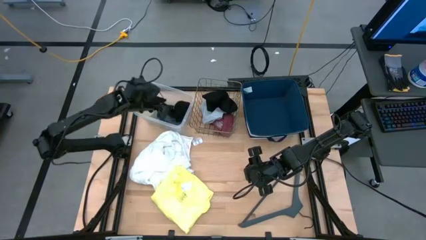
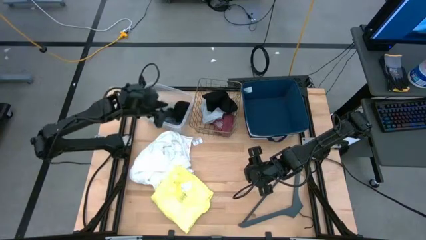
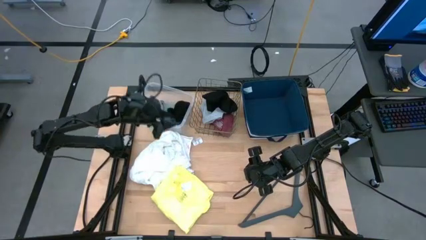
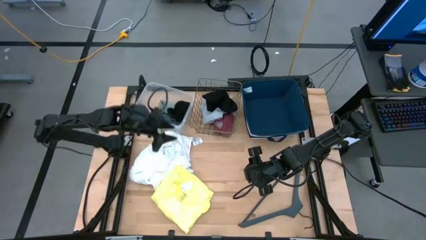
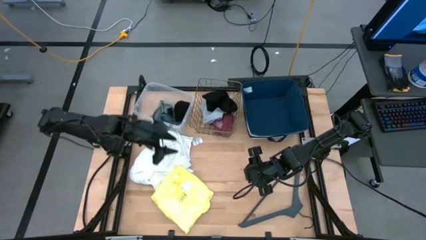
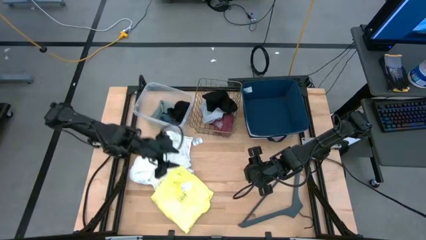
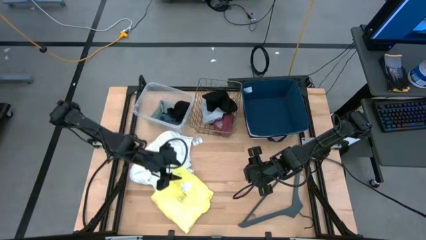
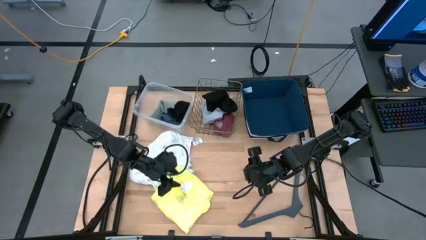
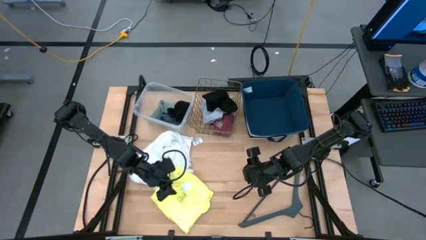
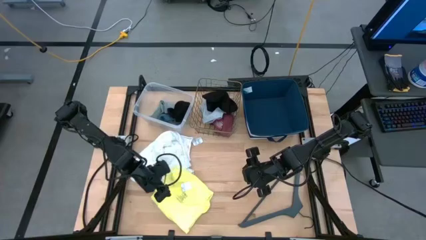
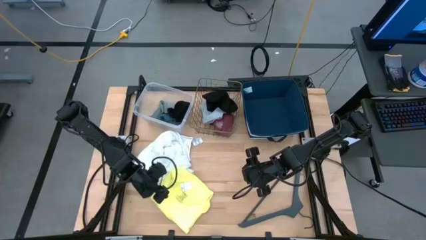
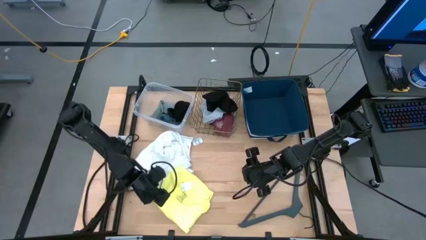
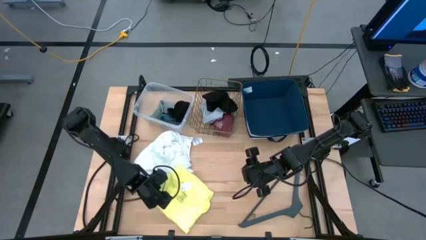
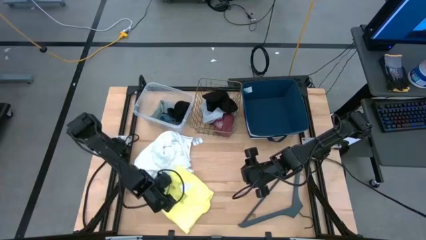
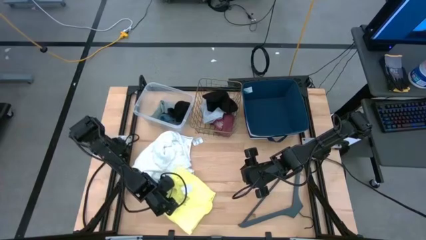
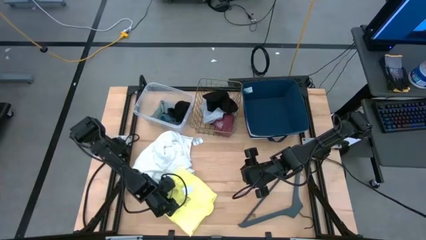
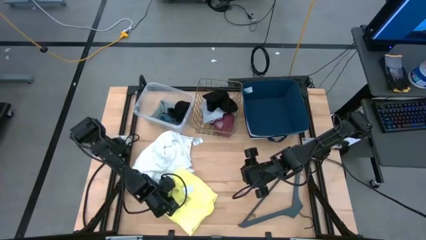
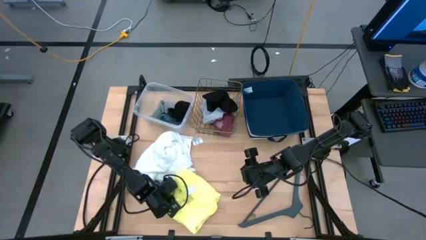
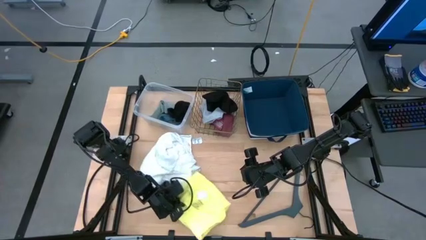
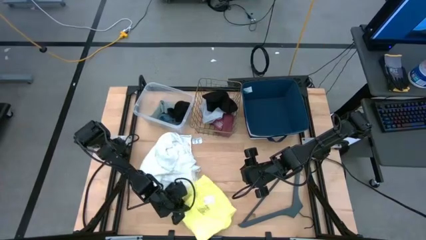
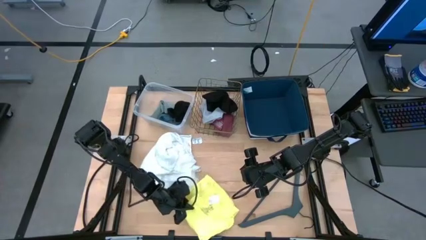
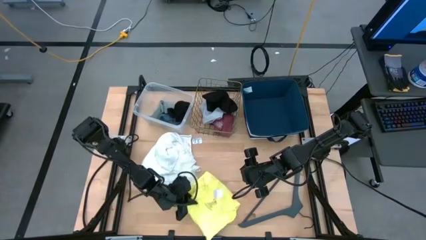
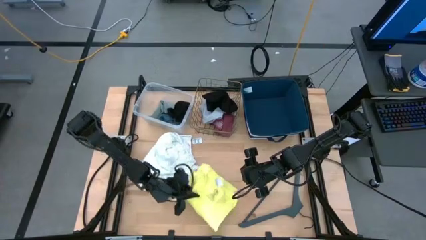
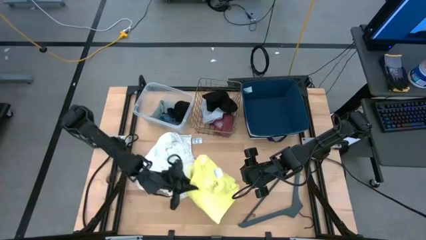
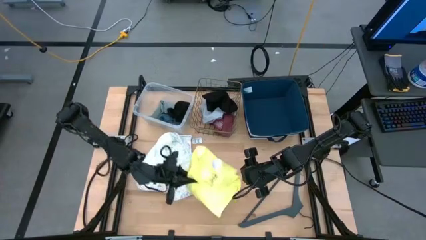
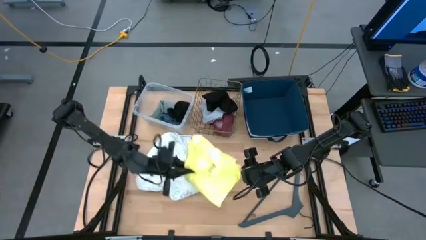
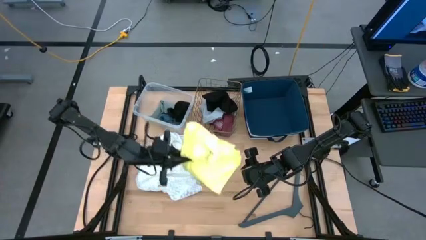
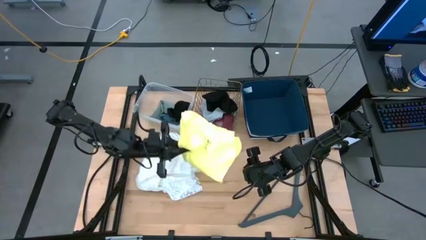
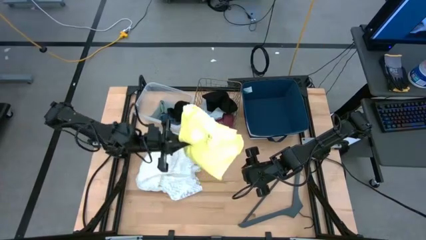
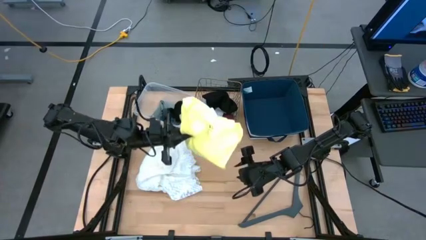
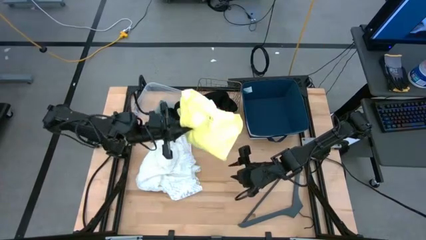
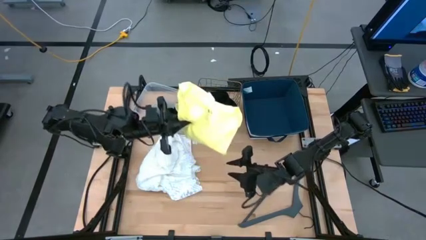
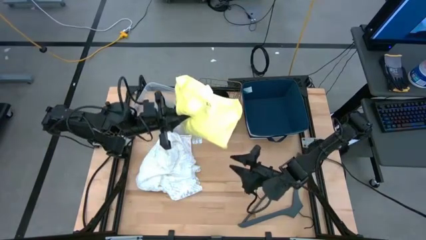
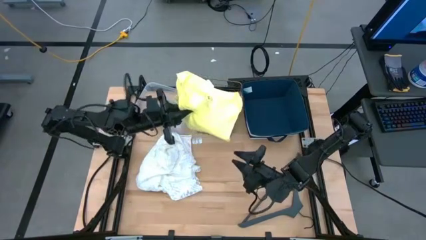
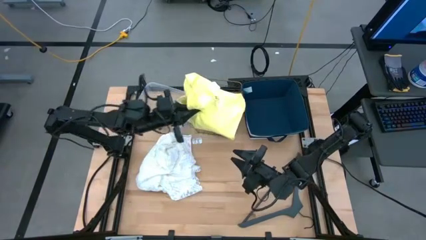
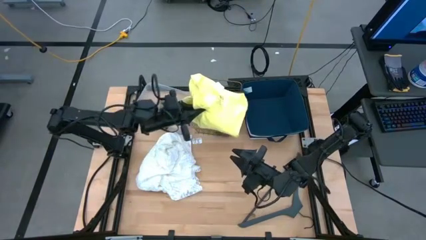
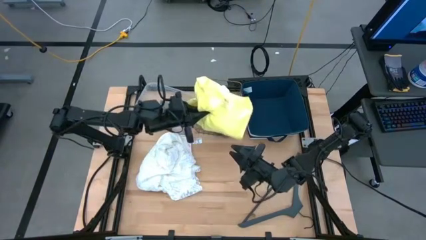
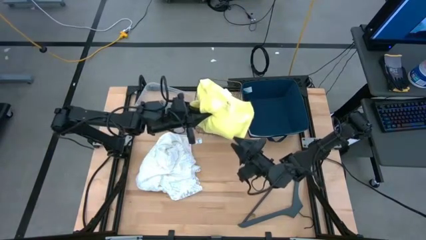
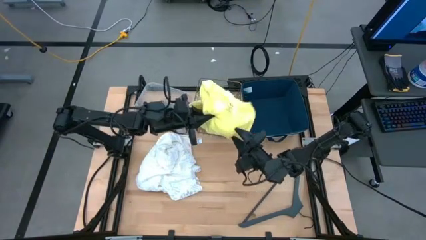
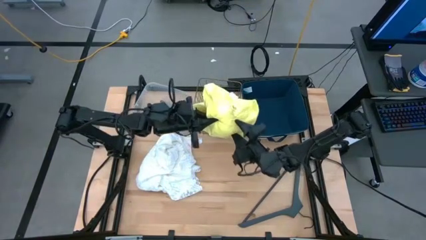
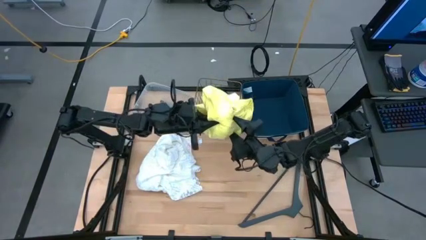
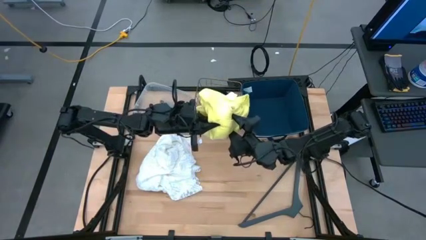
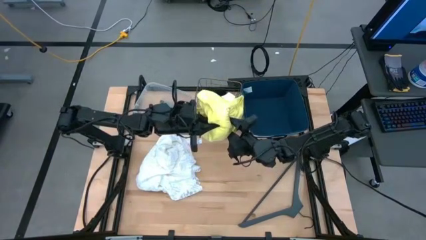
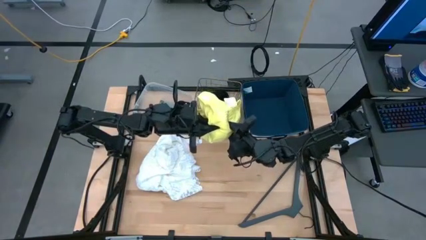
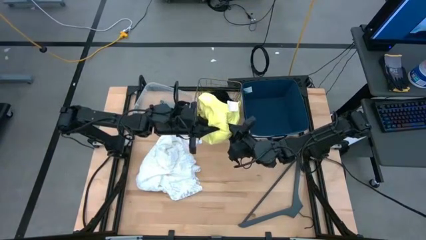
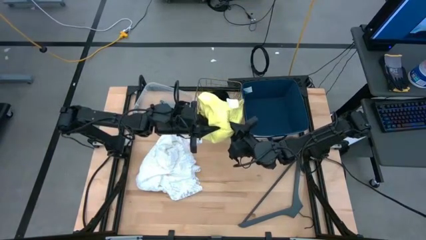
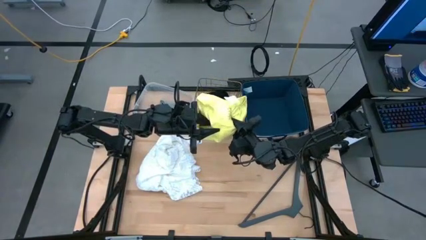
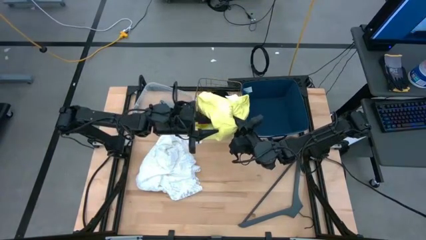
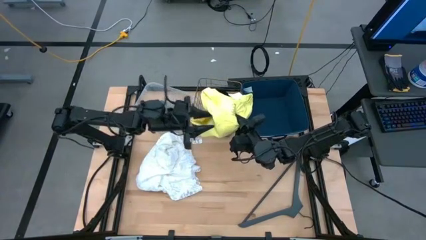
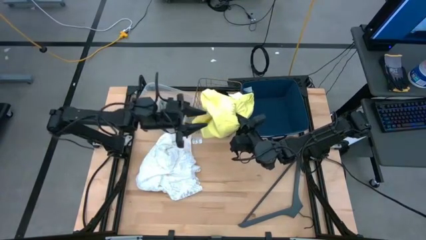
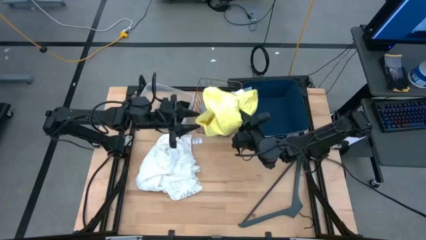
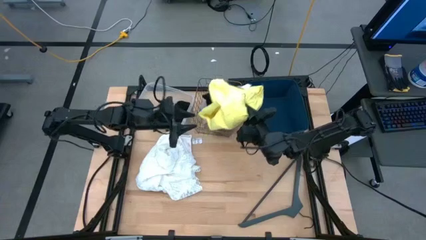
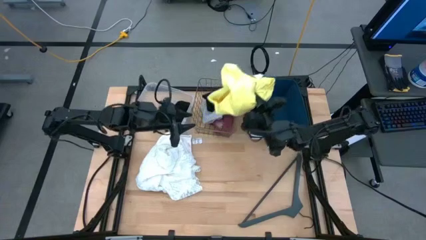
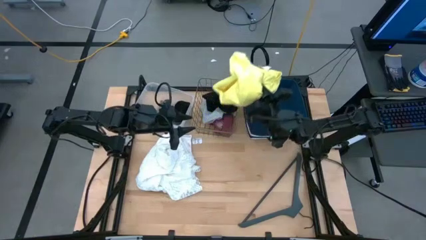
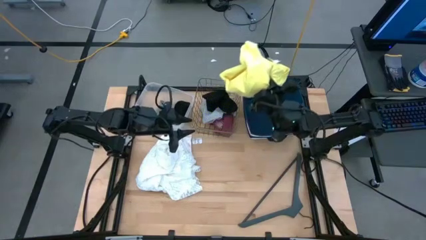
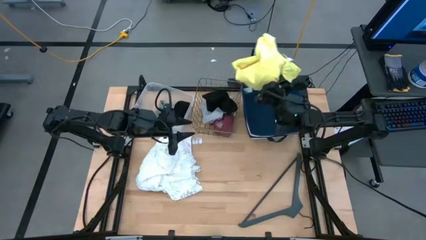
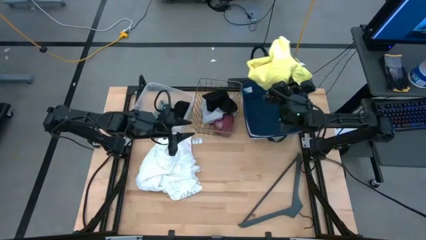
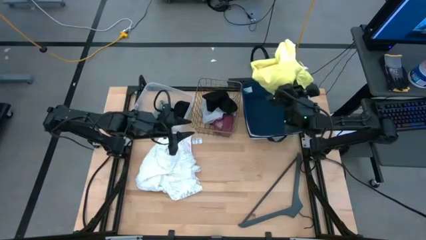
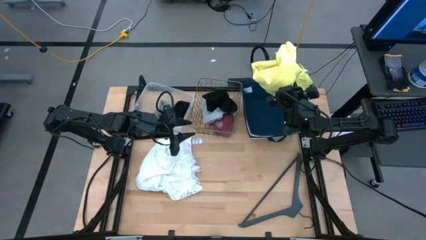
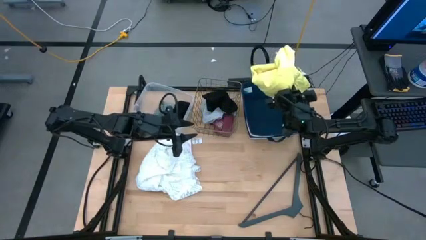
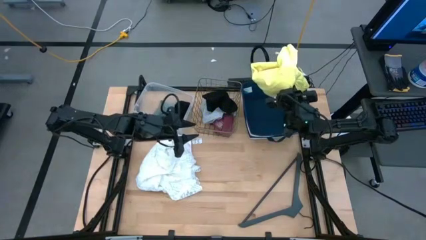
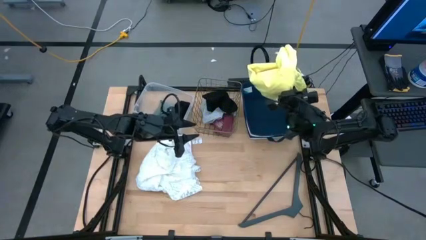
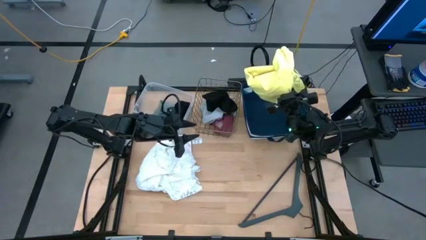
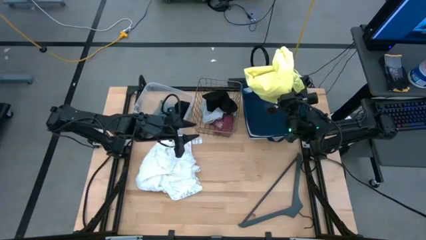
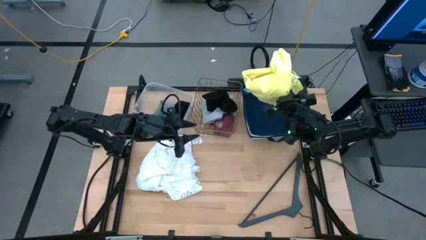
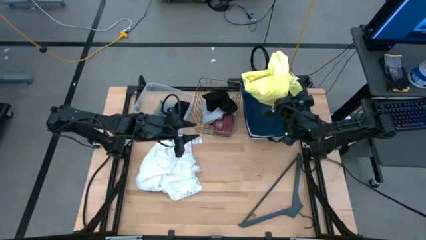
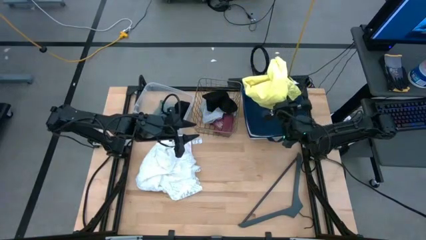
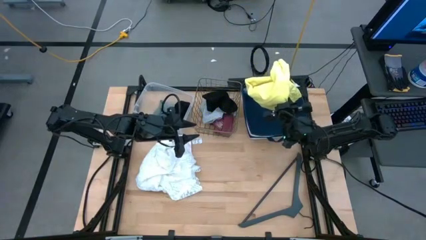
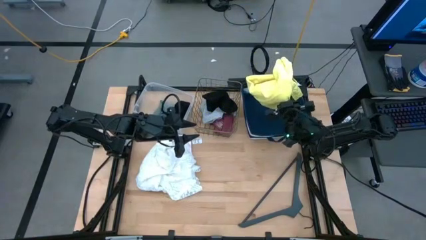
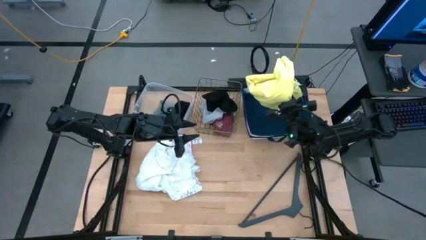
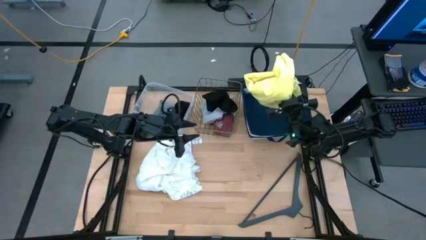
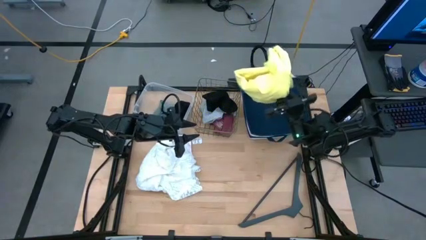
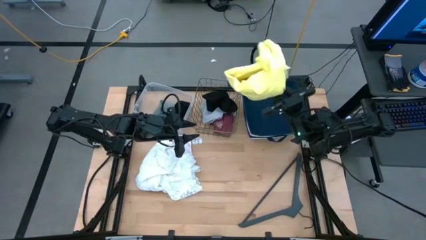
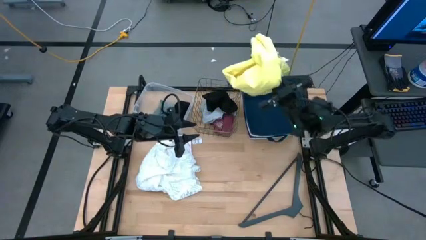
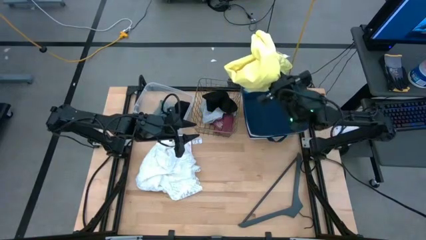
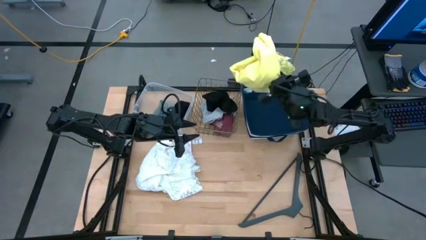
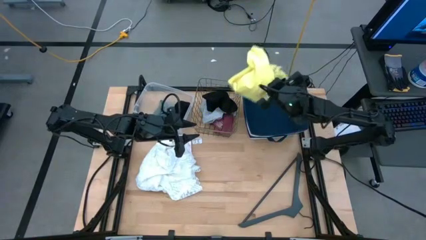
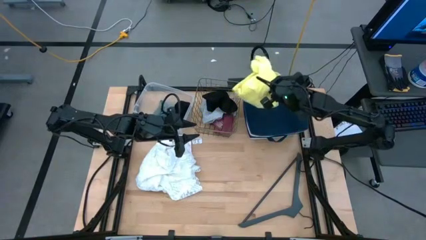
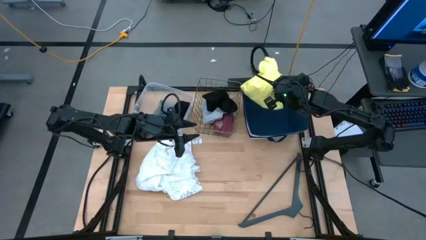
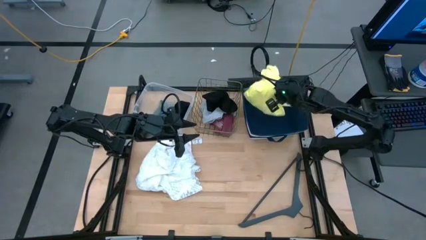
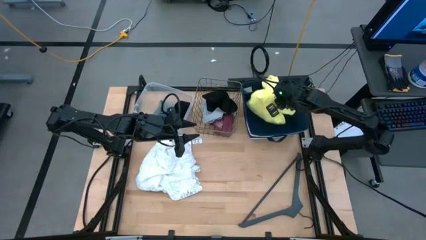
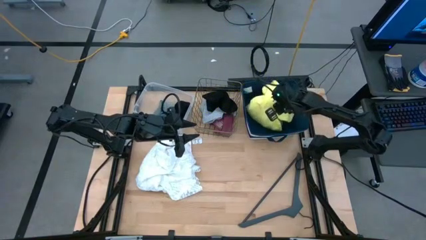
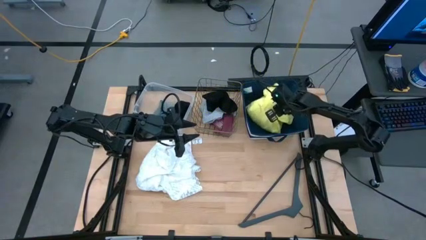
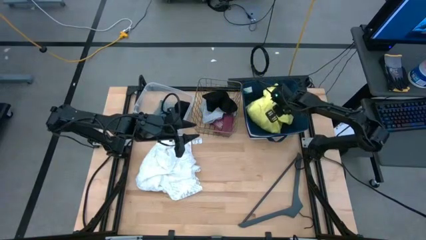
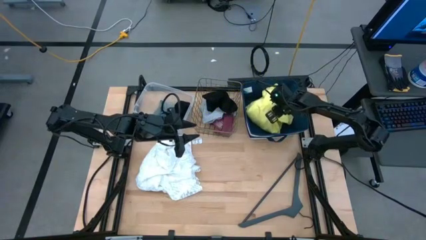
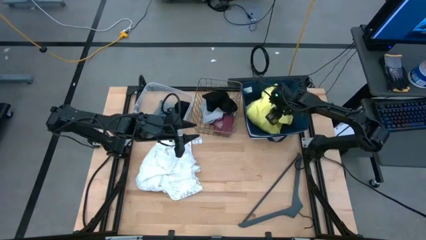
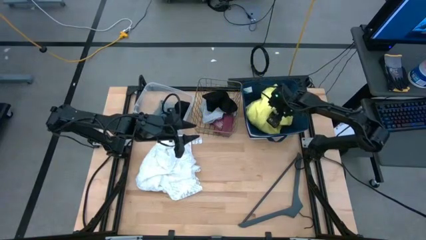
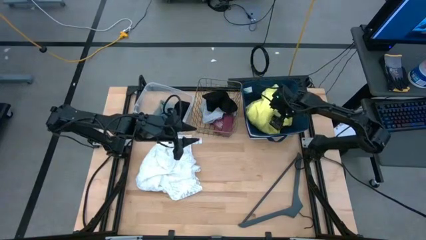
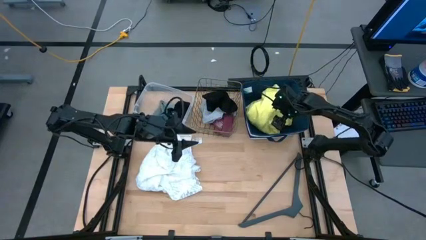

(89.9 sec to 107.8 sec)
Task: Pick & Place Cloths
Put the yellow shirt into the blue bin
